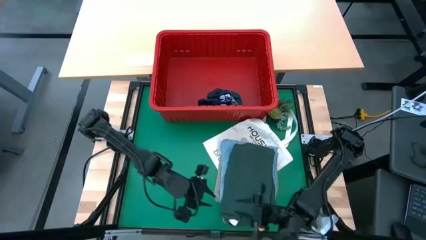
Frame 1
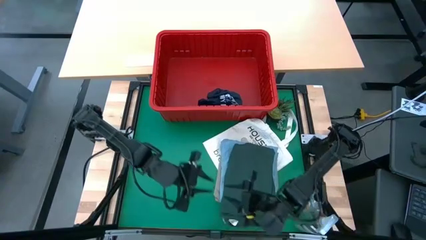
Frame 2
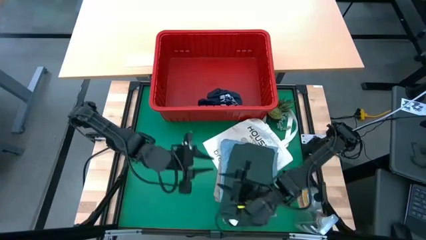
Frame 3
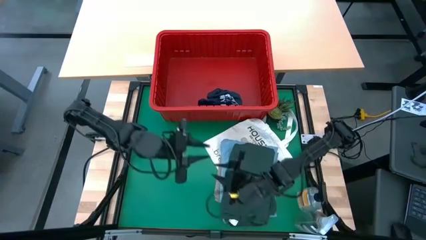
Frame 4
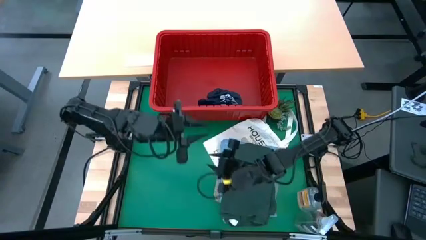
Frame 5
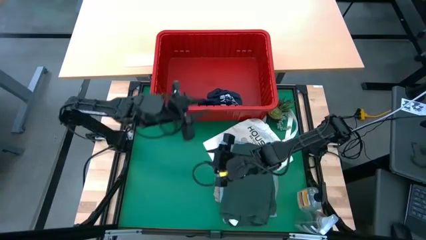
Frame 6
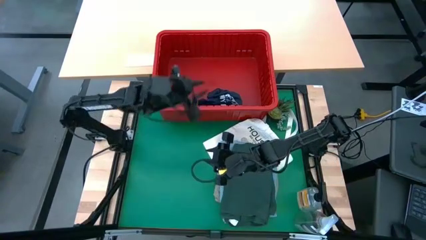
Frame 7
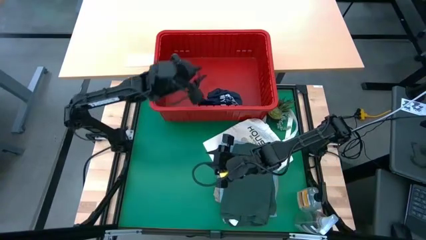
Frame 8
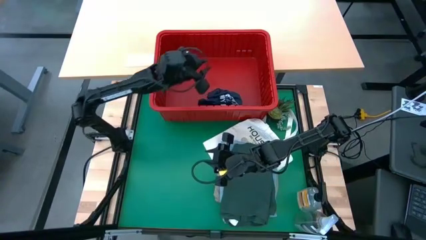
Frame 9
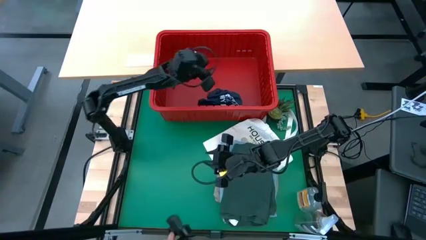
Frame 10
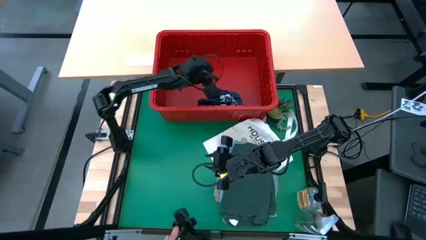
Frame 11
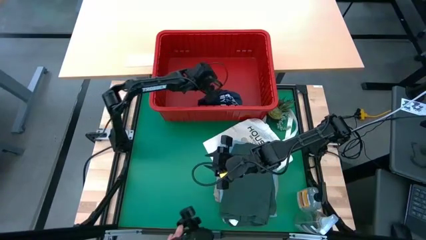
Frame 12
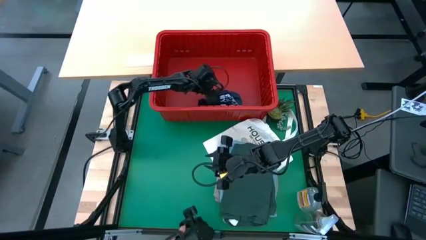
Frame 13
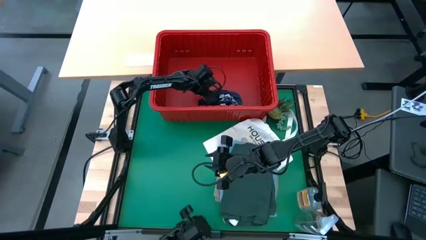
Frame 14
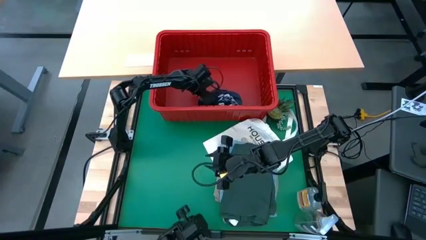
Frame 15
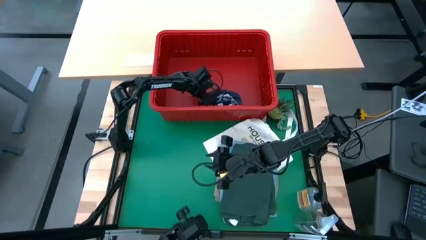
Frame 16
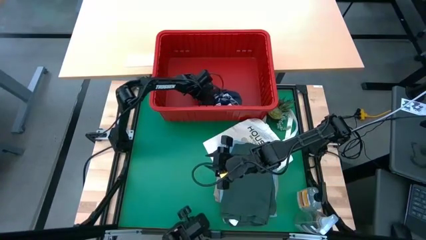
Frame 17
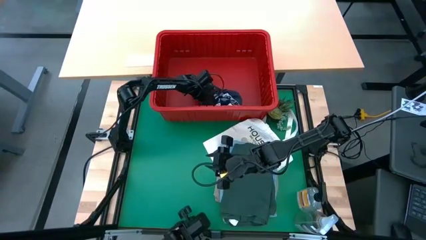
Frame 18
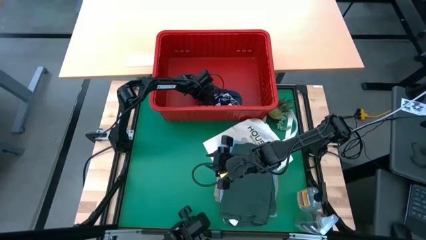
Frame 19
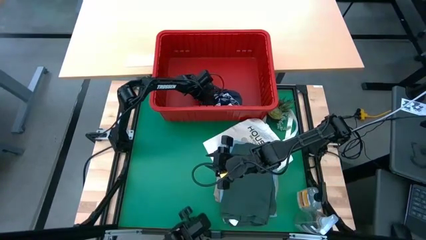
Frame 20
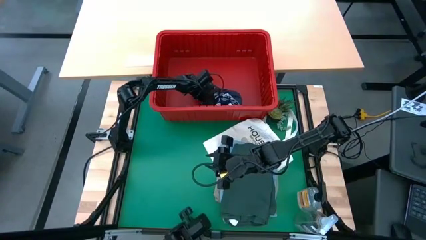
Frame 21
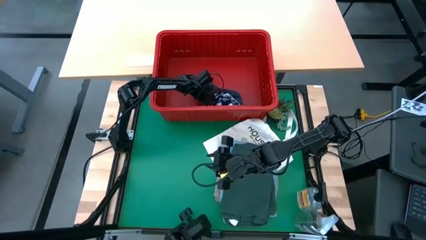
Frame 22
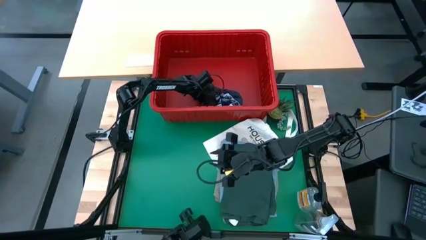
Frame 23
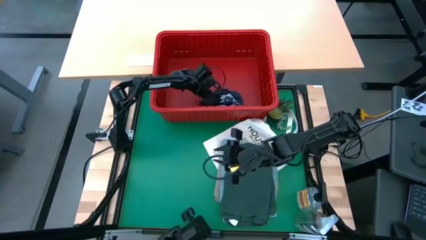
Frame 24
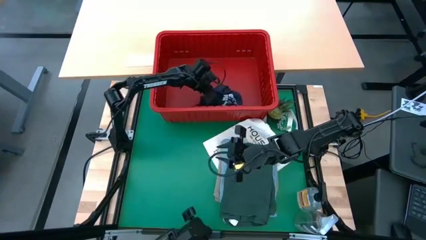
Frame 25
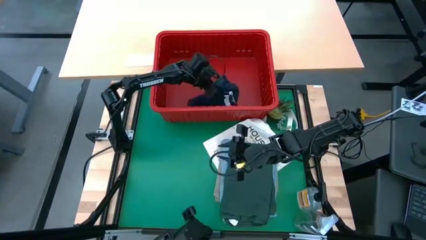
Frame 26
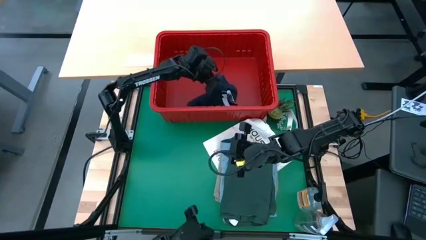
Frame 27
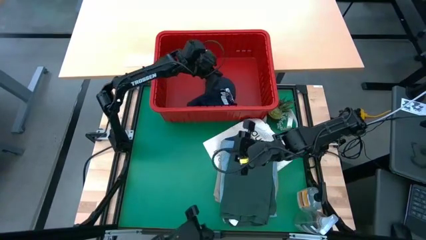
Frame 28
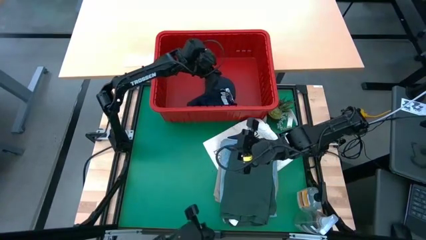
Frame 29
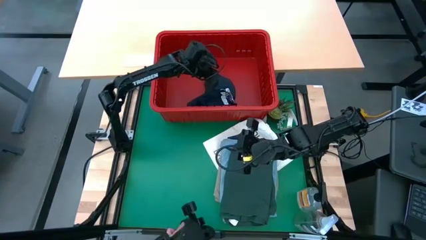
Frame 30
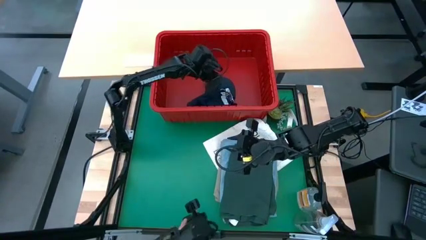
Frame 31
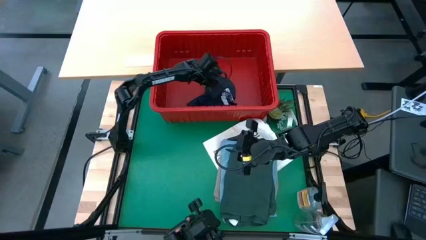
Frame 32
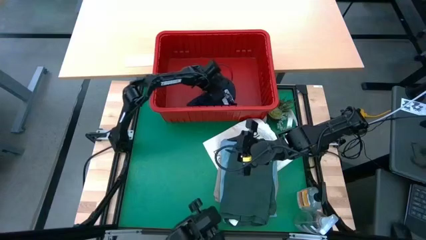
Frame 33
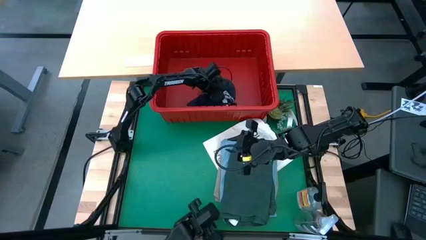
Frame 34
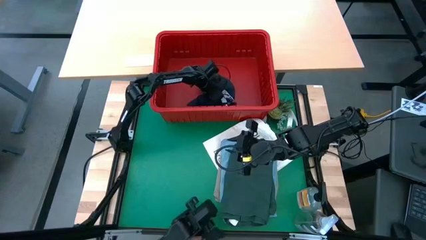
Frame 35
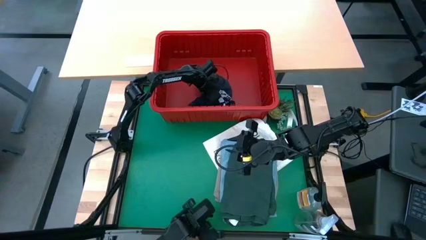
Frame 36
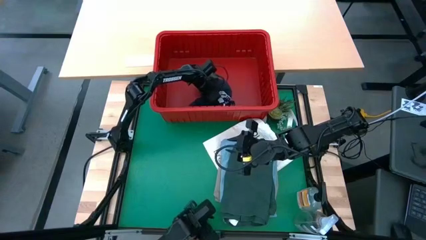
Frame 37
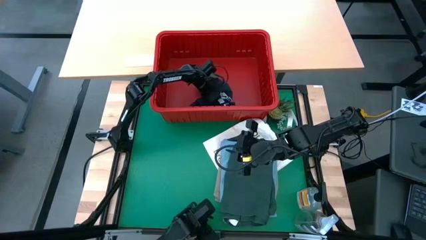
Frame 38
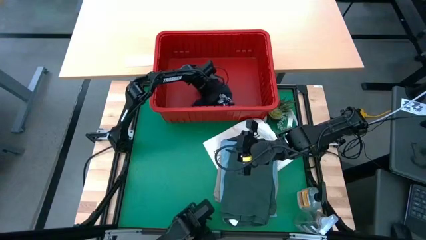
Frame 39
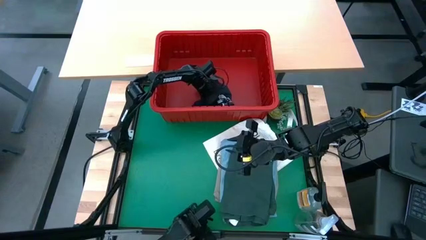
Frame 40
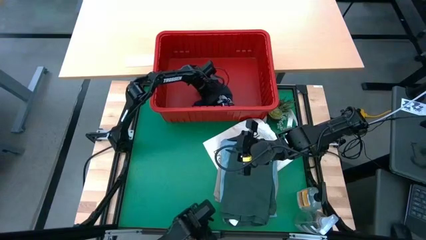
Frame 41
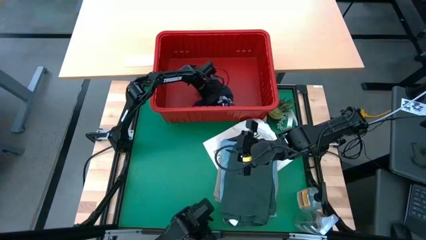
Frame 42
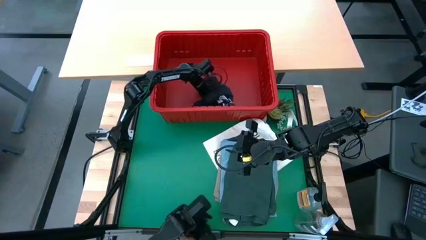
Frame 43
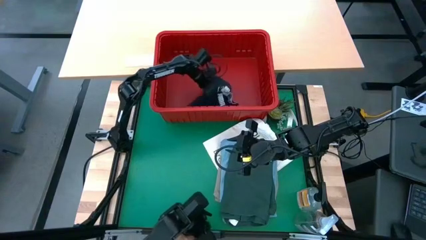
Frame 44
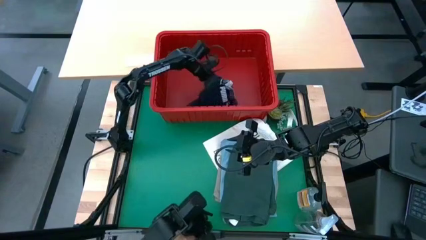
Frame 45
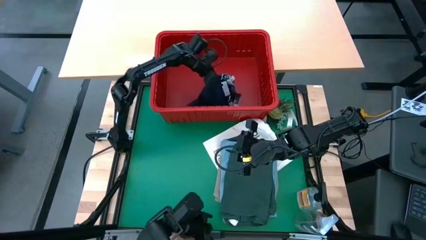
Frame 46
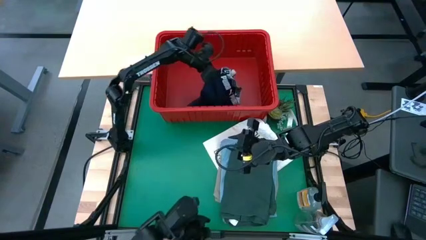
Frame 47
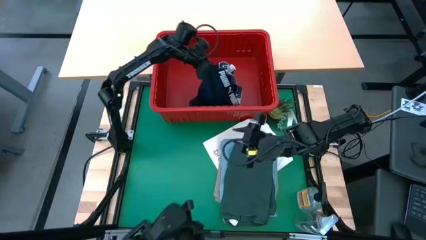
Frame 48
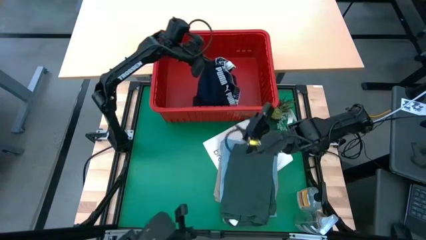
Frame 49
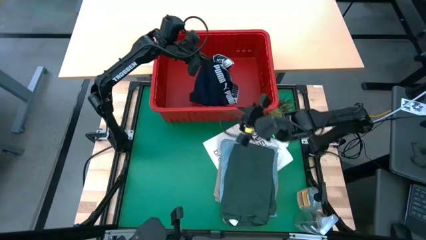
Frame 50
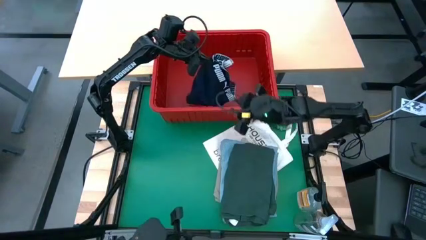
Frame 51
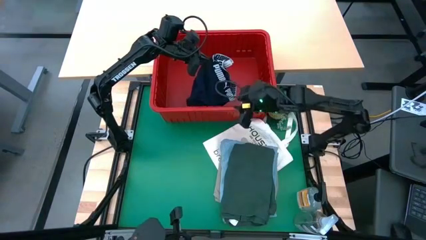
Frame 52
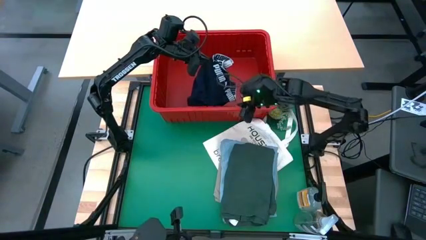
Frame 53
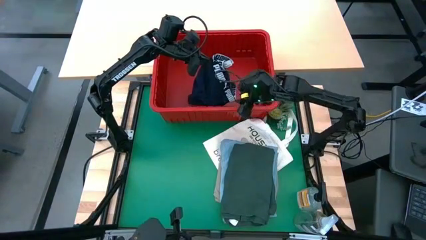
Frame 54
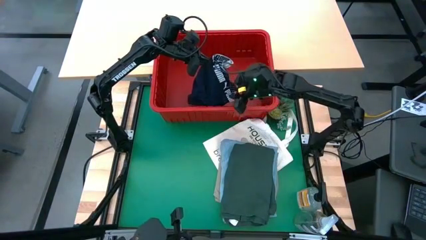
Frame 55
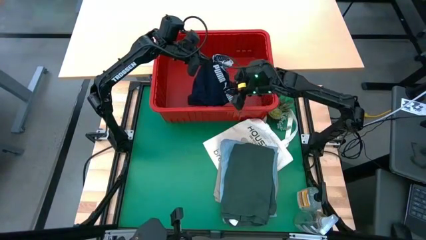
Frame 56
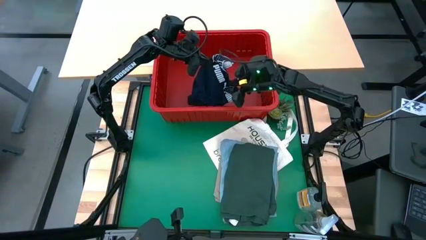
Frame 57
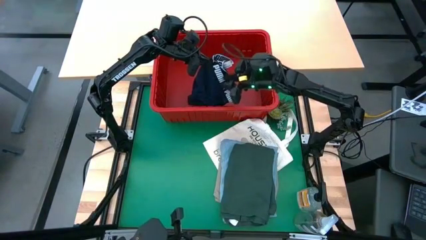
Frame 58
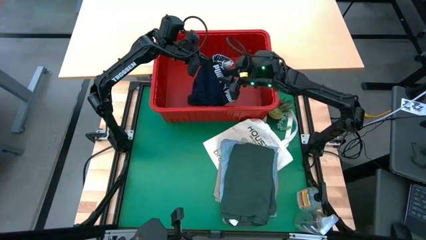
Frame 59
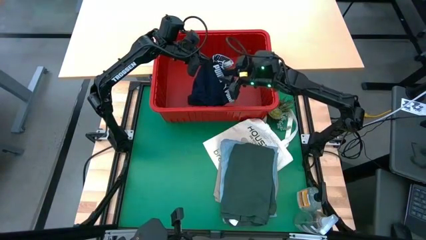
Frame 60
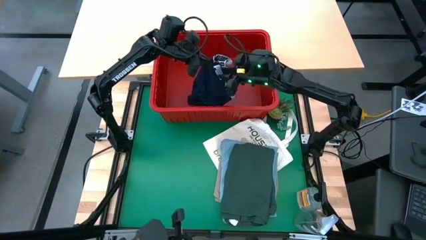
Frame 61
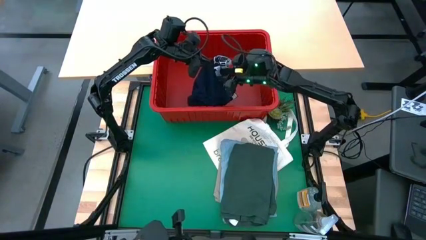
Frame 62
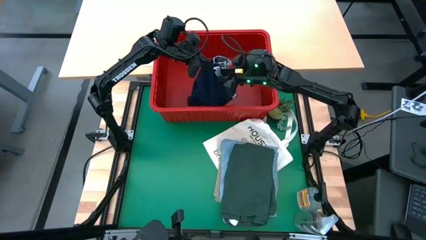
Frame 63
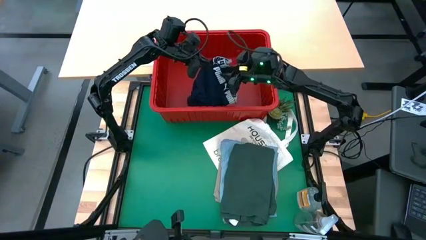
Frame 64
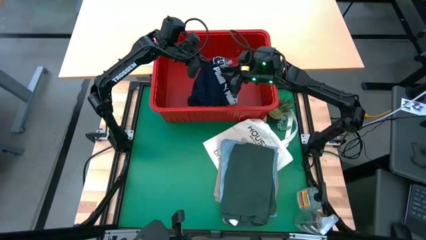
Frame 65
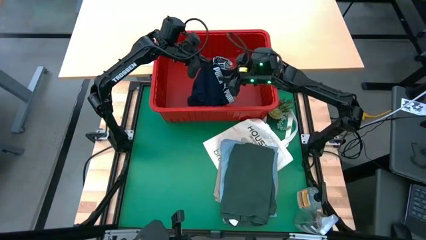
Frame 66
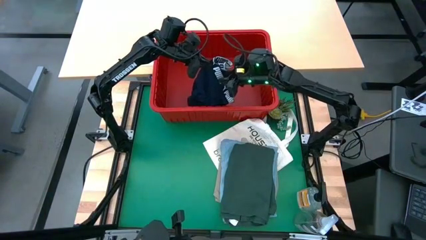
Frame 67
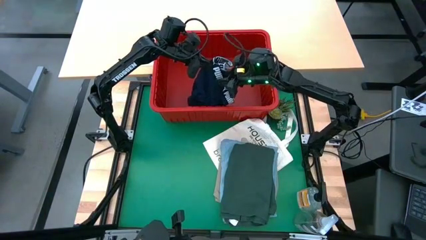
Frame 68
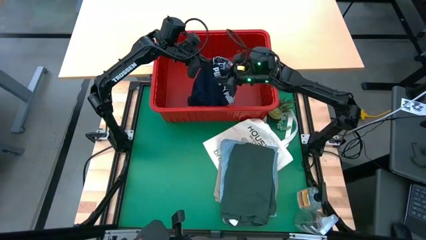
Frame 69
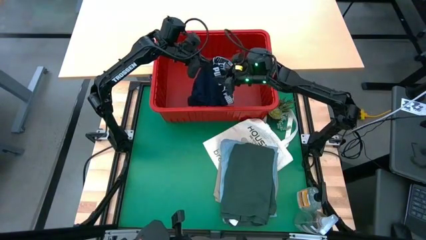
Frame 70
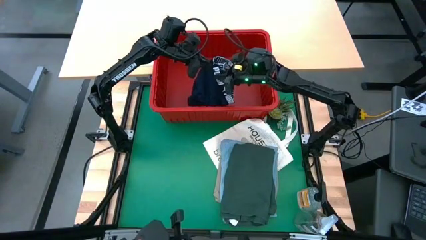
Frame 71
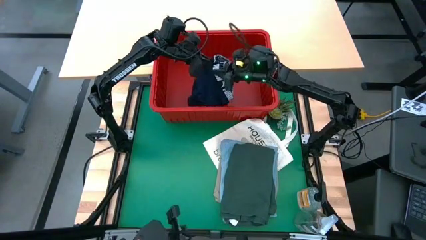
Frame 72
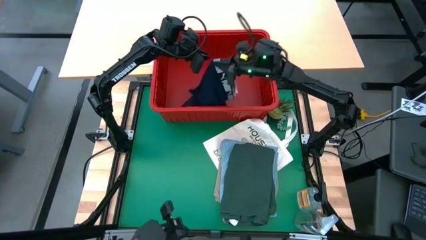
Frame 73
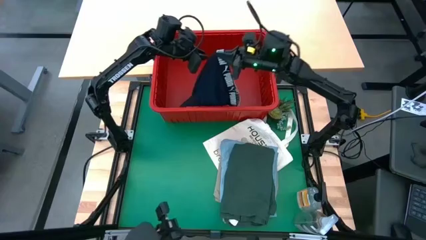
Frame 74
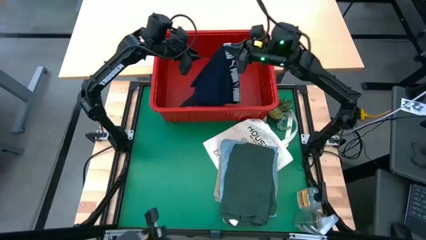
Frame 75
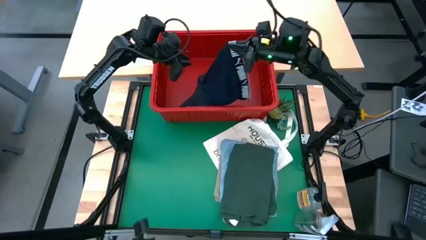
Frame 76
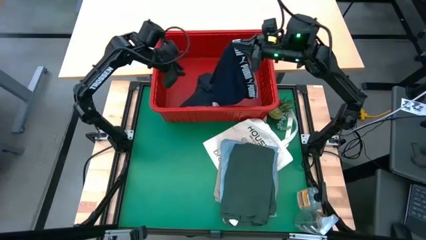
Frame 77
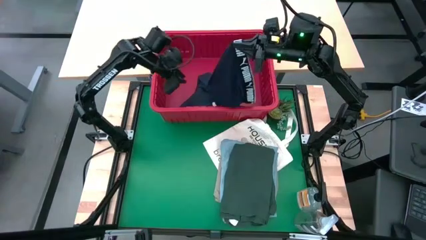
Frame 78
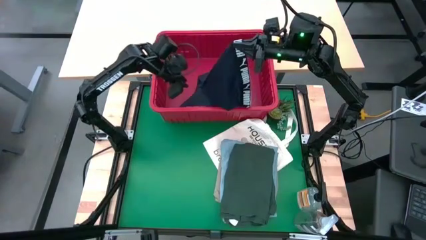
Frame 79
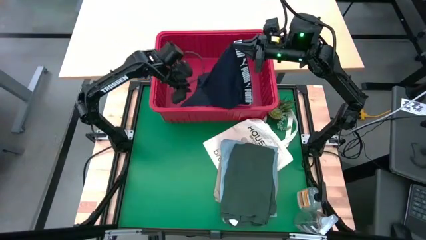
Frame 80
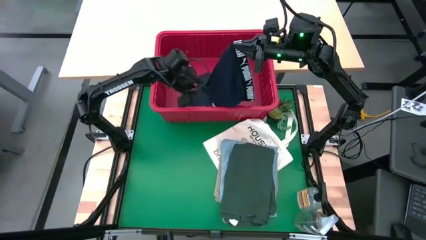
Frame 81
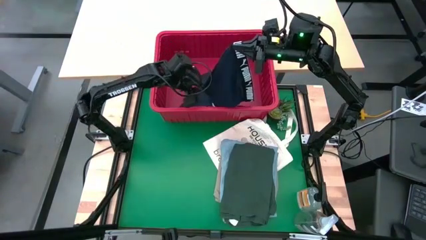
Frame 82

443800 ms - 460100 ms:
Task: Fold Laundry from Bin
Fold the dark blue boxer

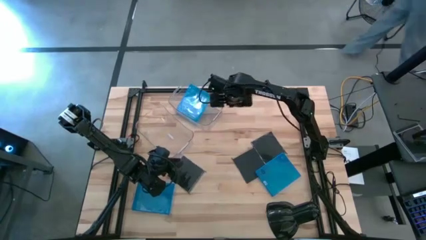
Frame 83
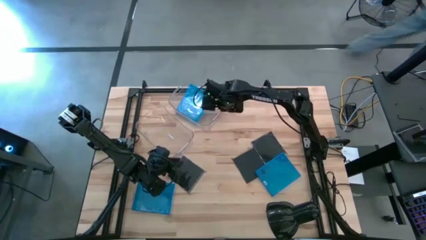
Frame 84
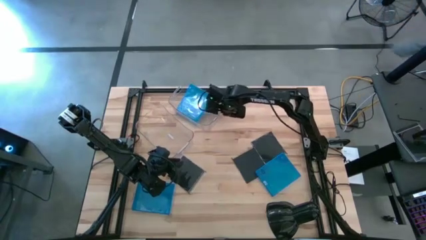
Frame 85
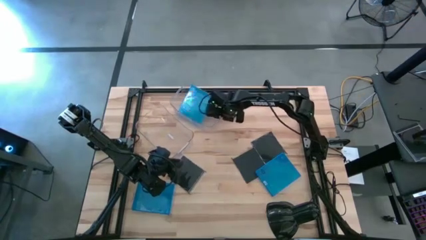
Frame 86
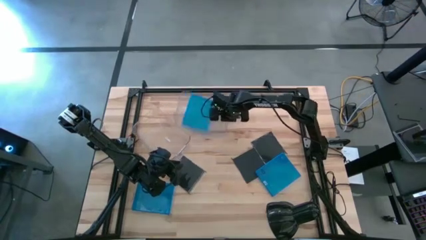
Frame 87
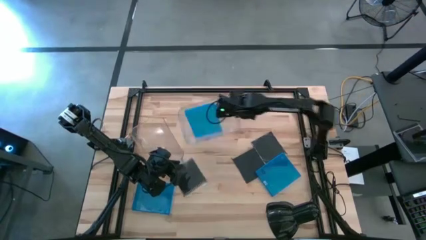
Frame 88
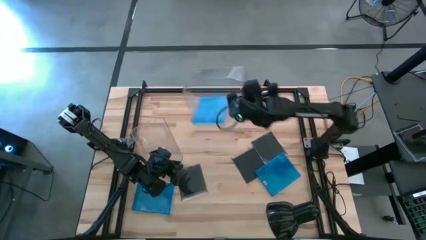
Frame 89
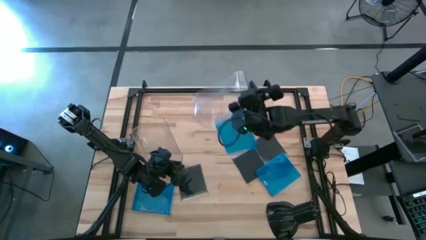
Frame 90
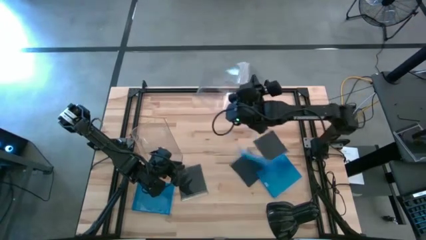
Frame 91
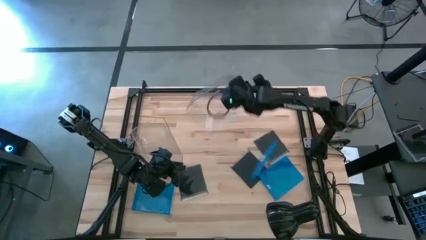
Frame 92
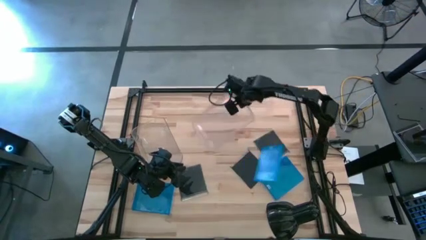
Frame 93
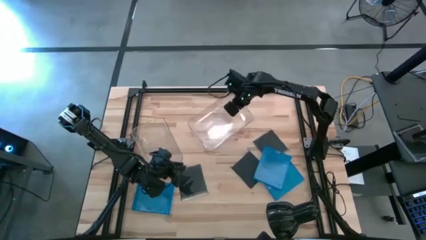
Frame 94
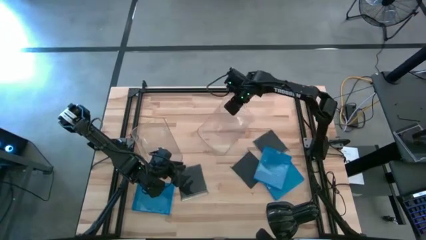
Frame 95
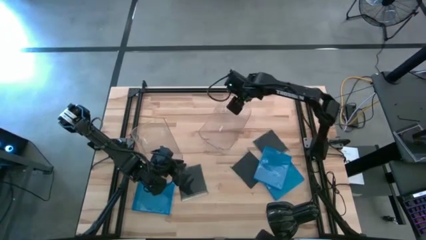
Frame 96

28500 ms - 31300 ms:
Task: Pick & place jewel cases by type
Remove the blue CD case from the right transparent bin
